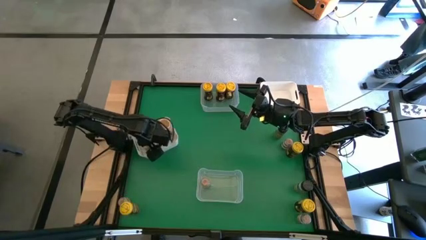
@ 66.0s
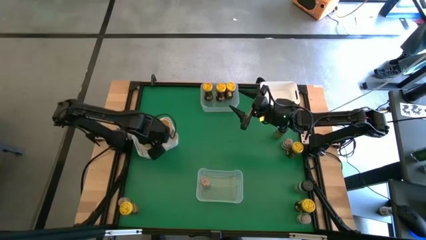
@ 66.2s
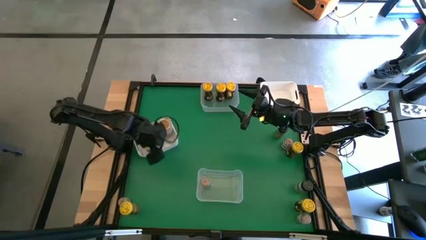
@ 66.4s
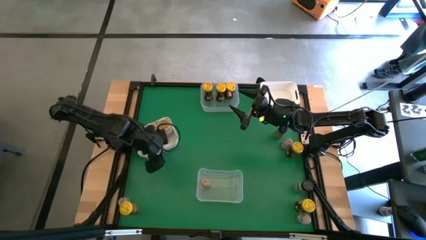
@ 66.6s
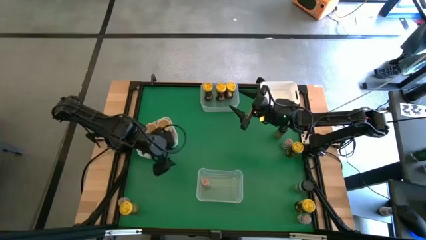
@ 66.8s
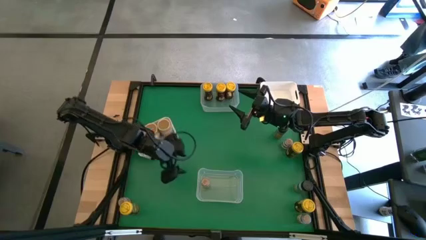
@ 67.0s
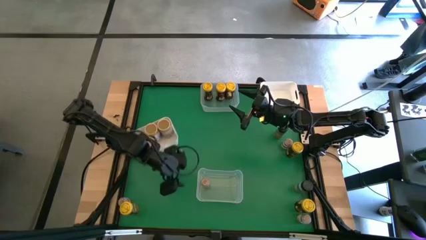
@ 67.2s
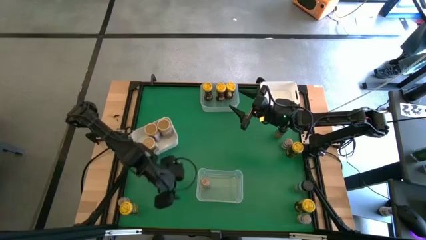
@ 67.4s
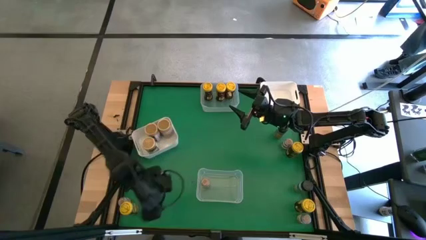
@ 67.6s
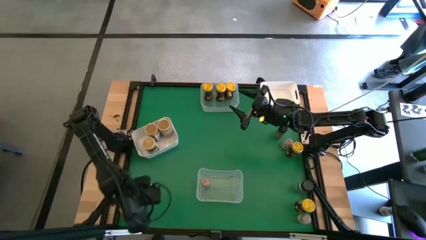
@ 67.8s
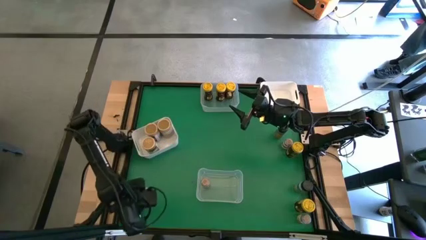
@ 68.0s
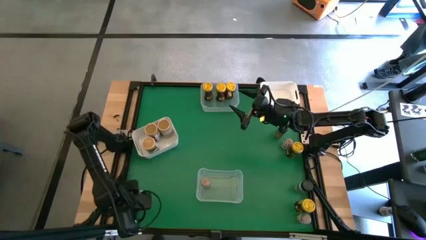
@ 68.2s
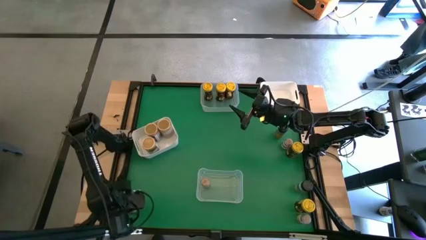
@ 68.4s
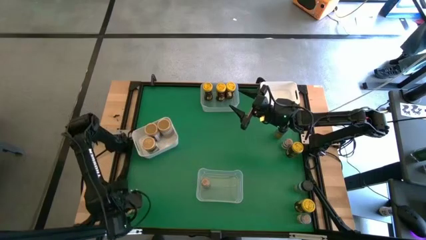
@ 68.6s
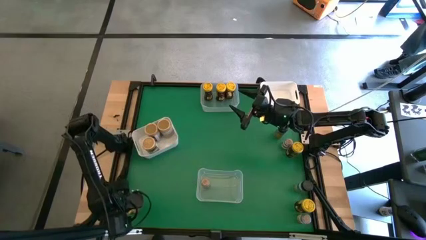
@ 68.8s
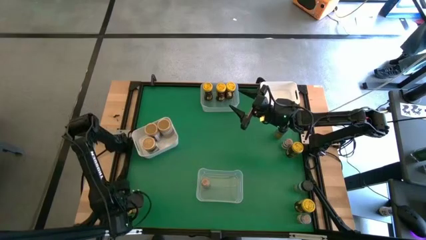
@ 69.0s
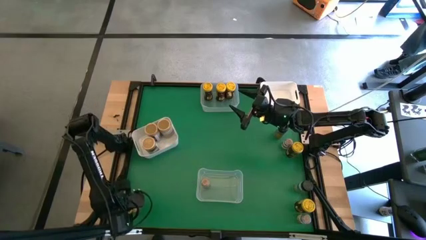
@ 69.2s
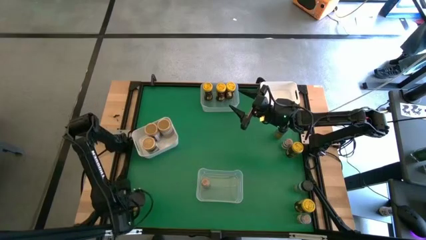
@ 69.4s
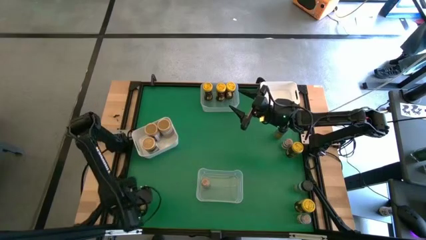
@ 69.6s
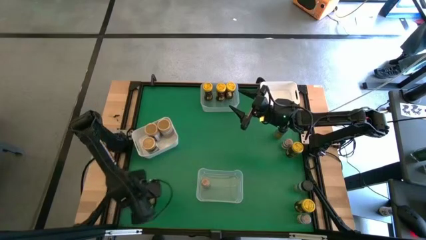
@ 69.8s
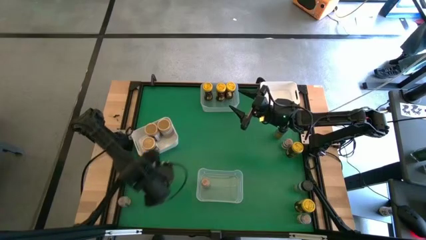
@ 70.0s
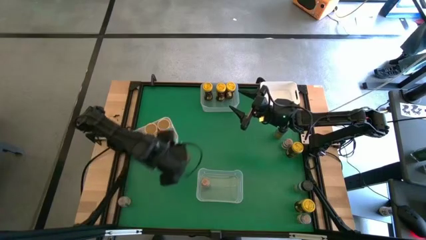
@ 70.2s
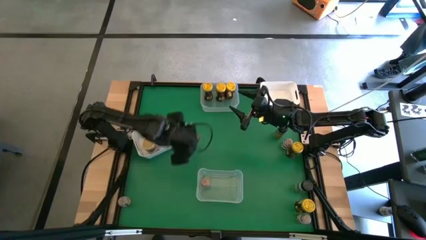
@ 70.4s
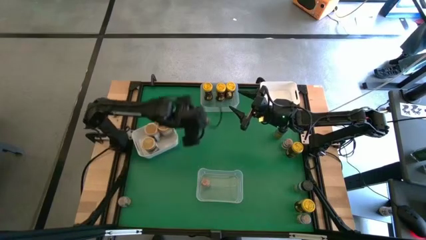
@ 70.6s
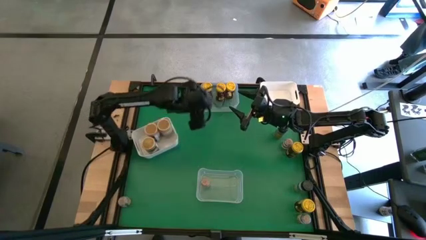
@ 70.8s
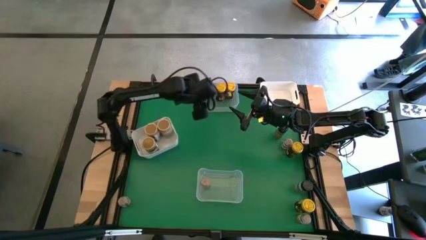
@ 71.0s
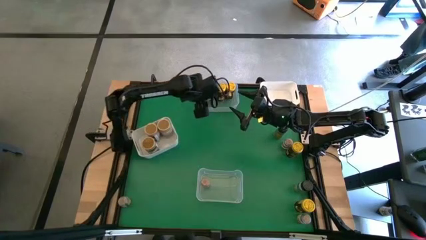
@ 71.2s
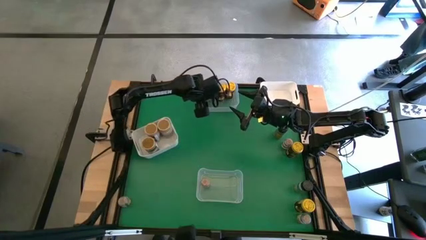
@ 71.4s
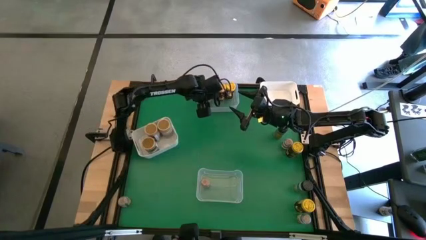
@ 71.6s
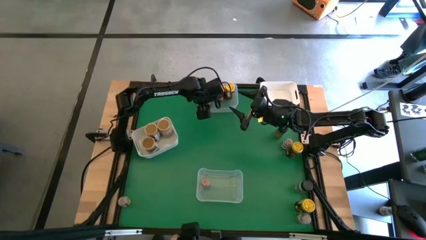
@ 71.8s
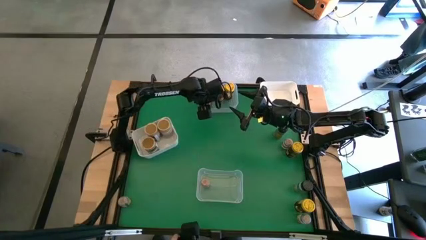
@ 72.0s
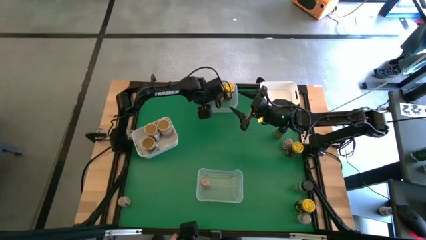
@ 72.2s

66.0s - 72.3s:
Task: Sort spices by type
Put the yellow spice bottle into the top transparent bin

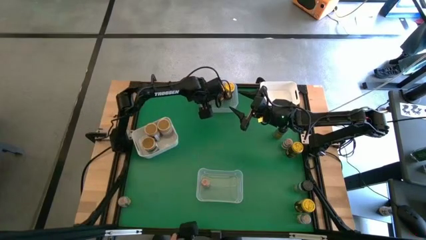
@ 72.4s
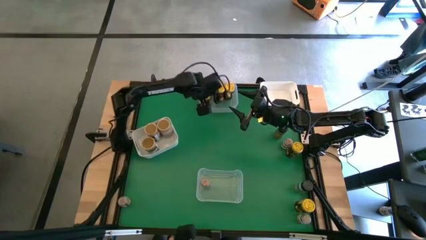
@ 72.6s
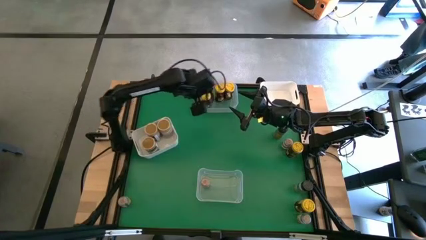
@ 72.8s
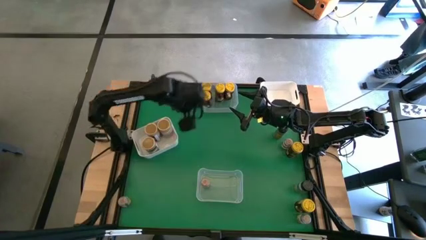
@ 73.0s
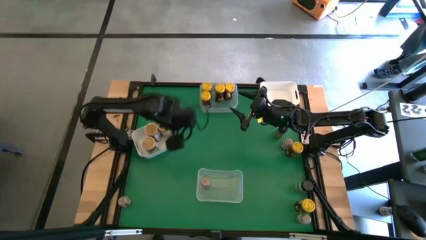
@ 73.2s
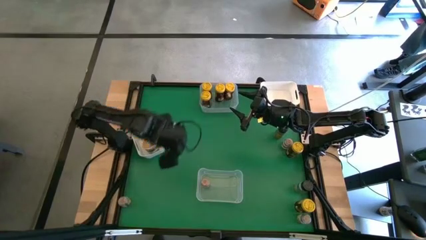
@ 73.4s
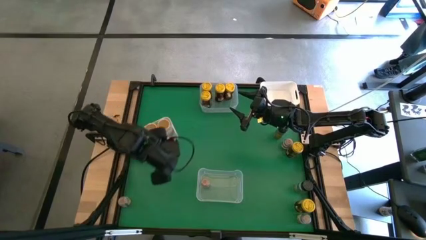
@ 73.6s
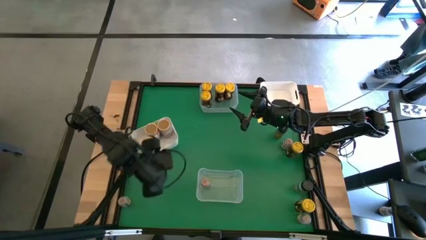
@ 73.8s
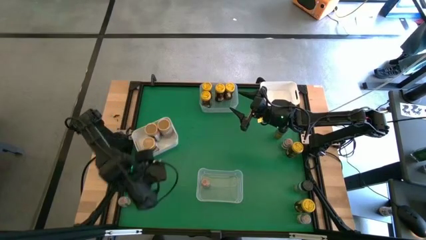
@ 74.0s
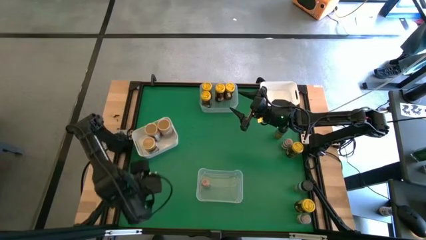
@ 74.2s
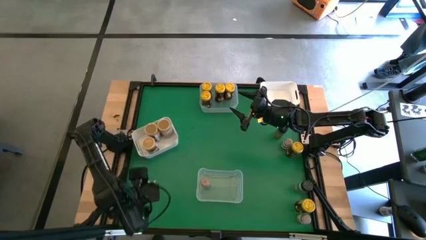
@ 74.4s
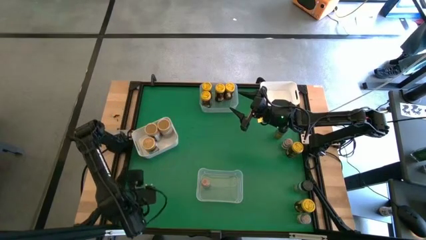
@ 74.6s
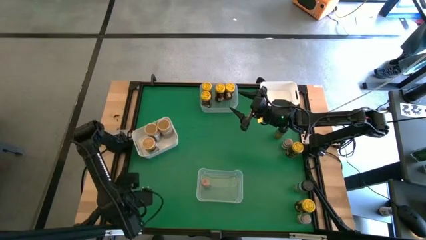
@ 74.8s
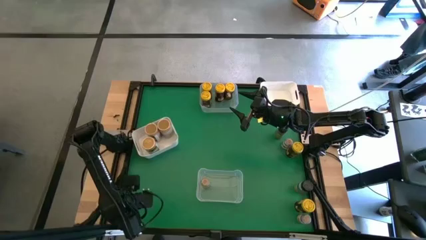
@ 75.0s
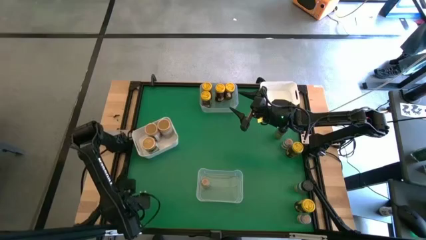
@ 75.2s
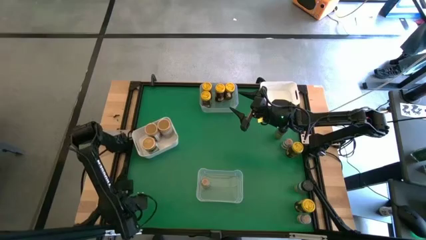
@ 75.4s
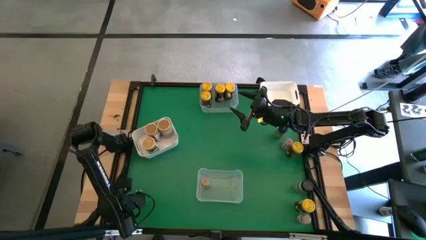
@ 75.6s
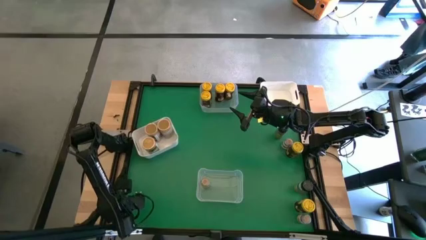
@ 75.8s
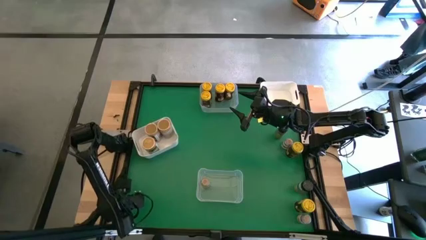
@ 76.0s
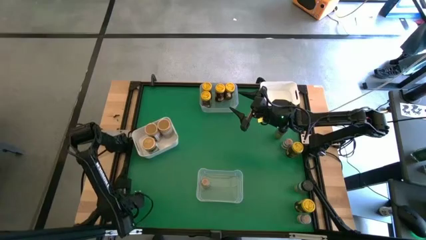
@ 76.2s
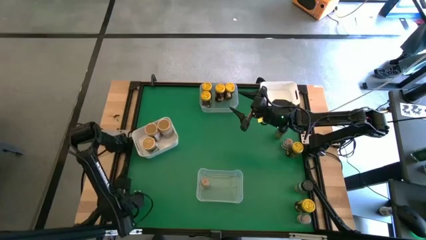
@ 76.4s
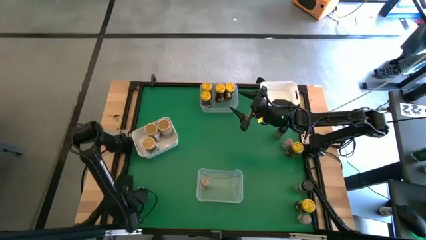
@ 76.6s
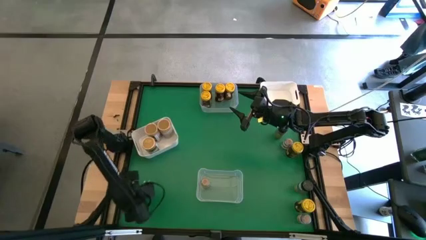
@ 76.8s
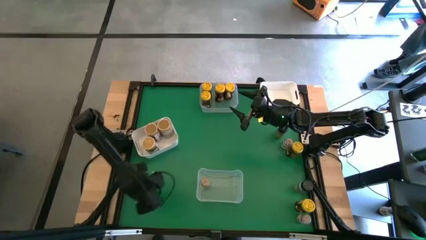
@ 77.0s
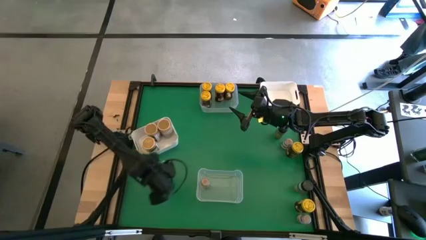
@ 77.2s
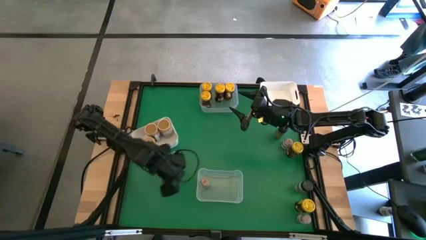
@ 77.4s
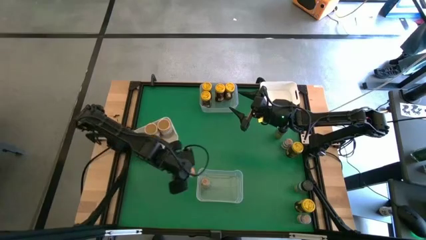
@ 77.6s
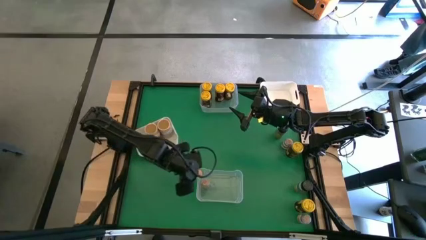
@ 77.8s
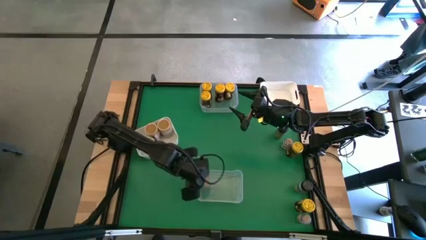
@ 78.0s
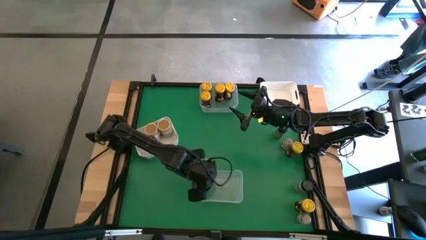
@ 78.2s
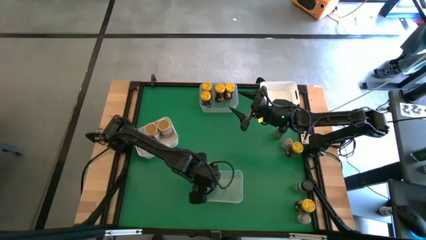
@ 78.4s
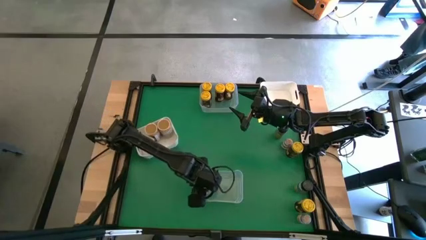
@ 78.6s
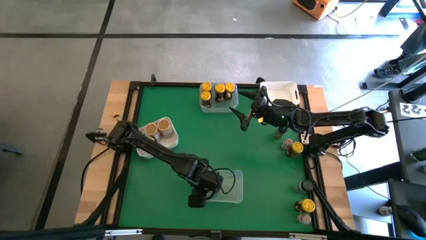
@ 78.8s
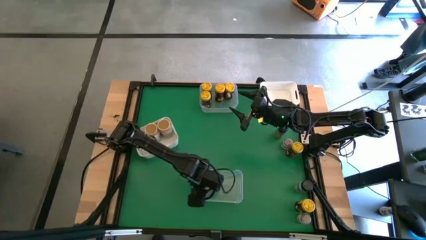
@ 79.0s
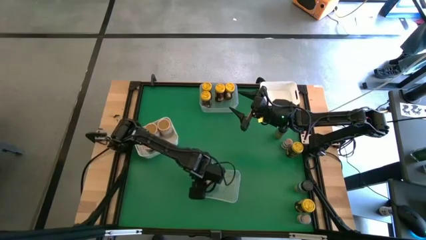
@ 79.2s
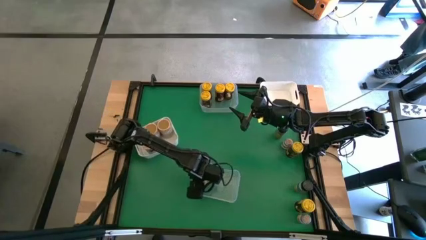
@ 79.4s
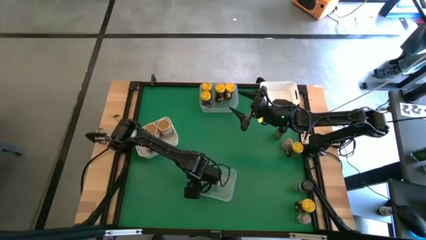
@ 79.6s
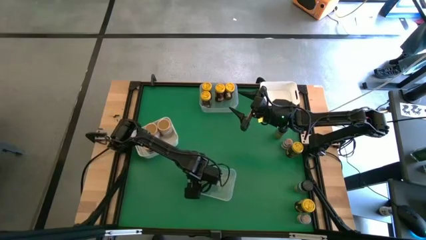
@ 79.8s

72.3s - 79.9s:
Put the brown spice bottle into the bottom transparent bin

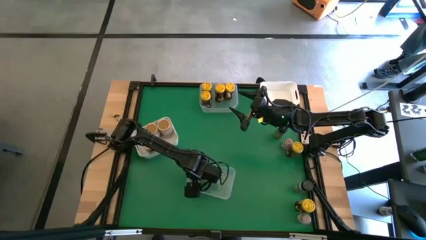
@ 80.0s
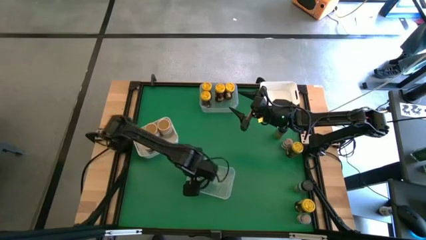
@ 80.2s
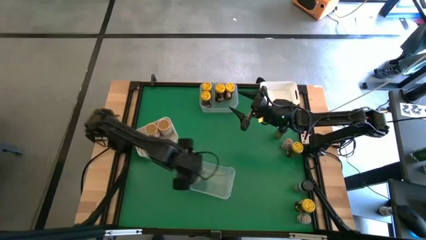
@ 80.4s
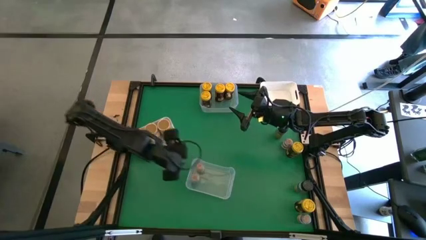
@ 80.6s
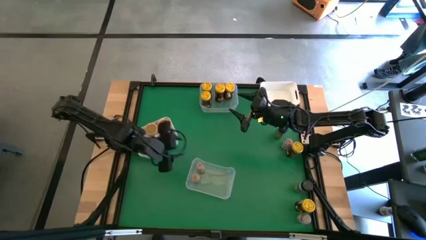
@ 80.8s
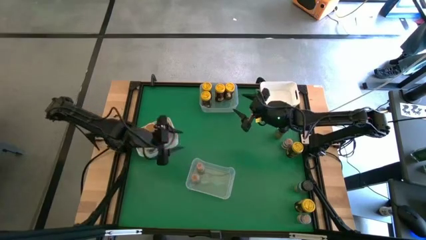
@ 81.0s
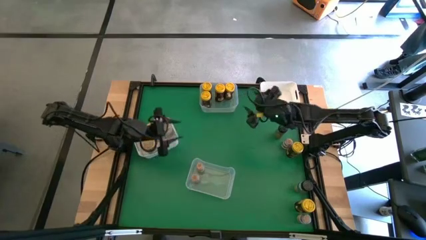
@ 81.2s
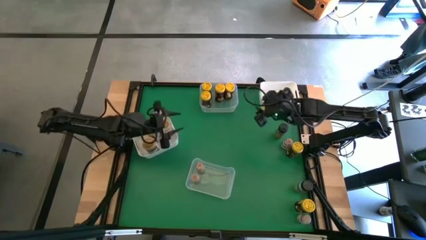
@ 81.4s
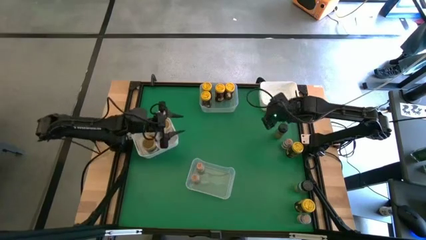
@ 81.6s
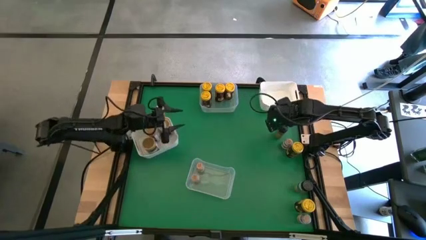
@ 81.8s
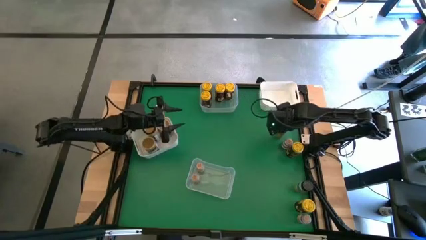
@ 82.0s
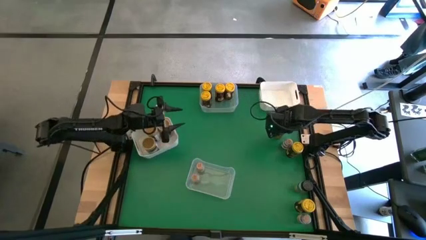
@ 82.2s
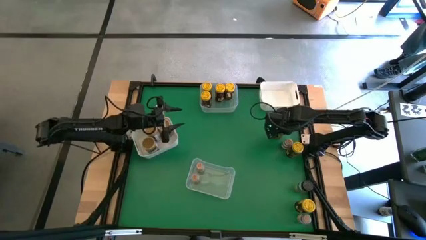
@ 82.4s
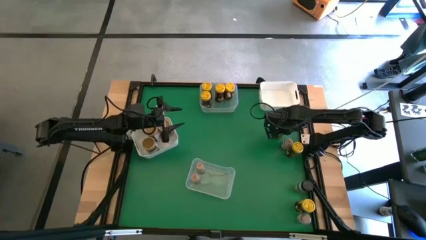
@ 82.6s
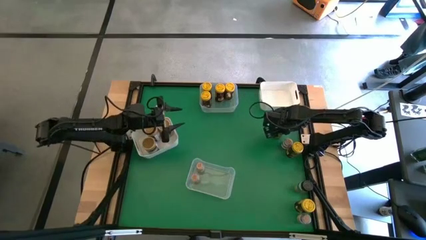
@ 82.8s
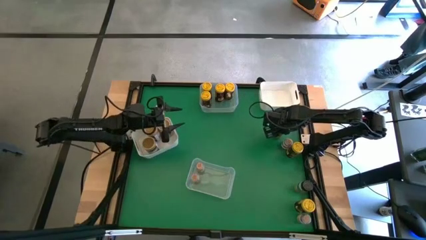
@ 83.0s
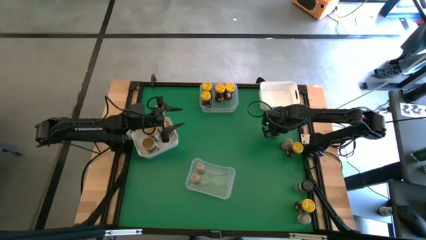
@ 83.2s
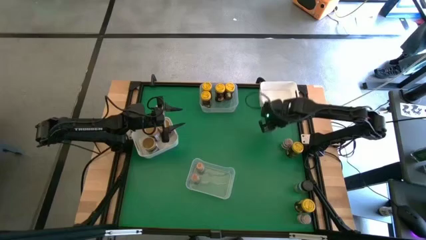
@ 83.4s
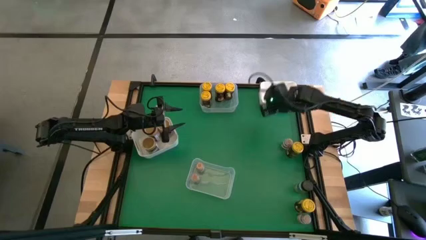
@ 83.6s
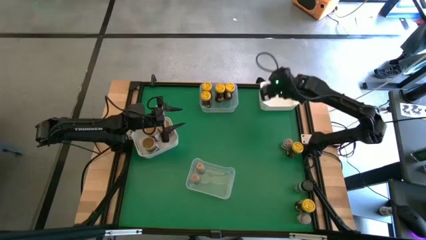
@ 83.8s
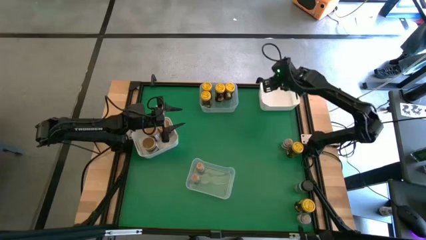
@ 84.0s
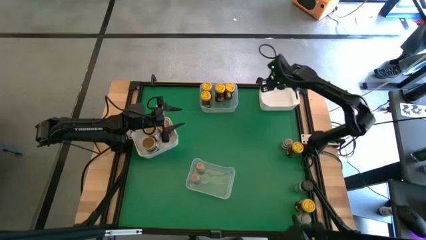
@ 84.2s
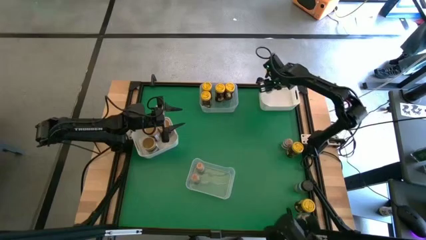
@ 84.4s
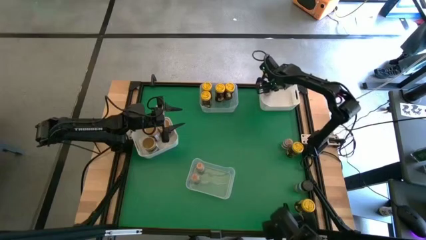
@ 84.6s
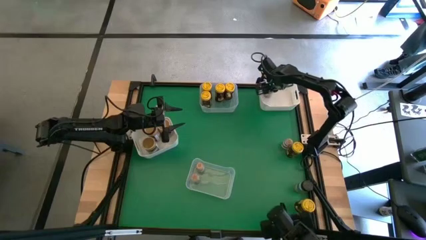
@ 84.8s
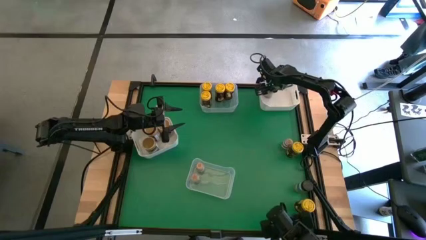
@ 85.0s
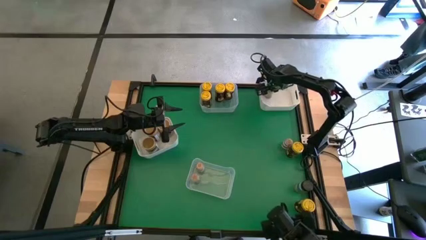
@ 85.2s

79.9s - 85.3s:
Put the black spice bottle into the right white bin
